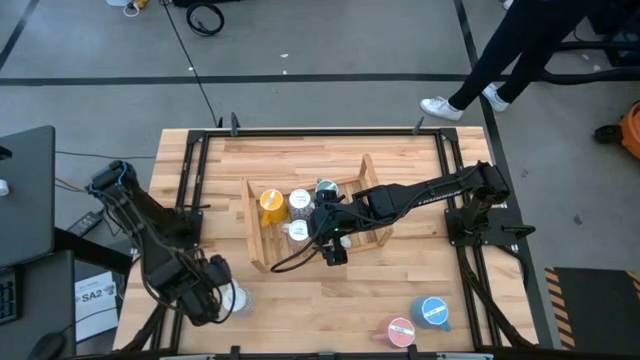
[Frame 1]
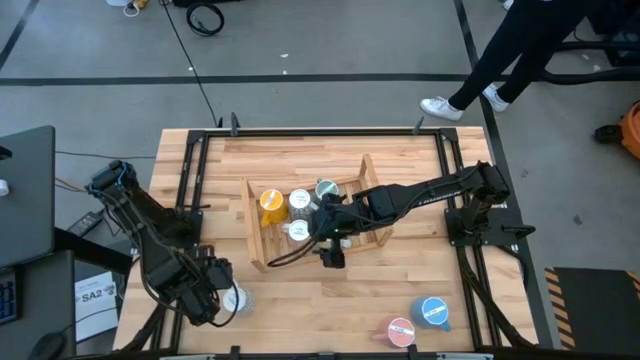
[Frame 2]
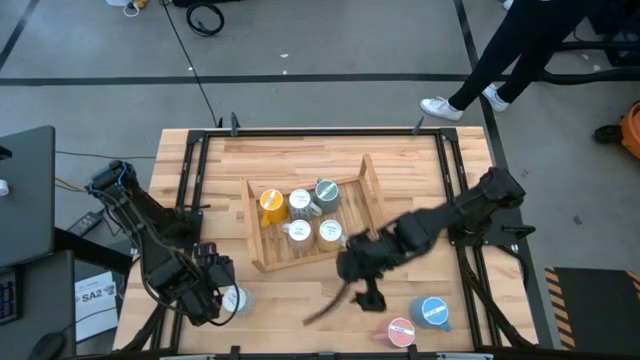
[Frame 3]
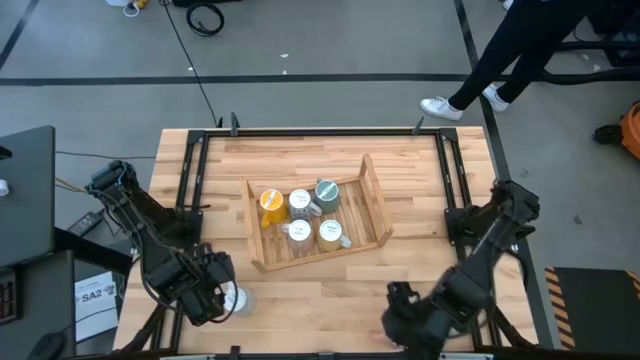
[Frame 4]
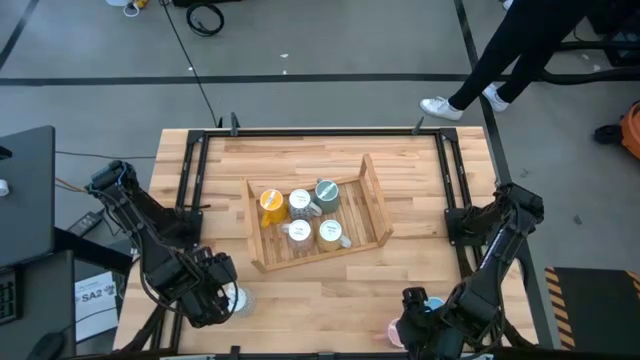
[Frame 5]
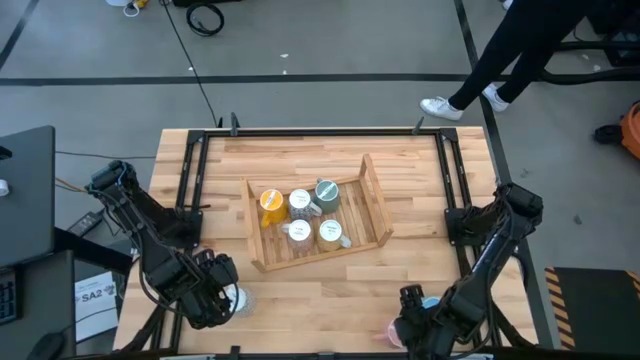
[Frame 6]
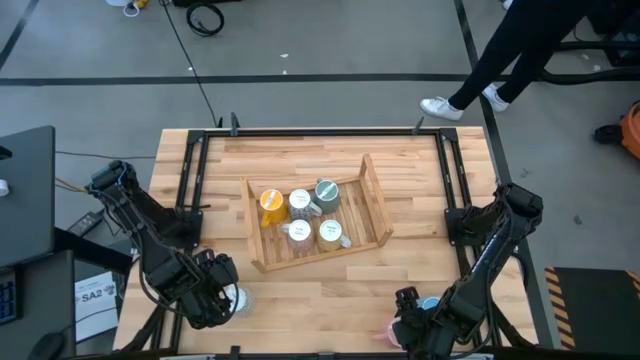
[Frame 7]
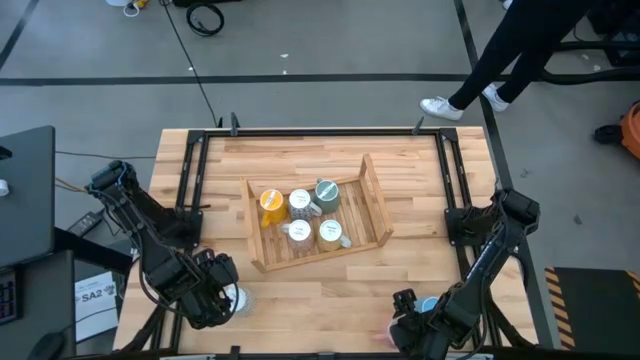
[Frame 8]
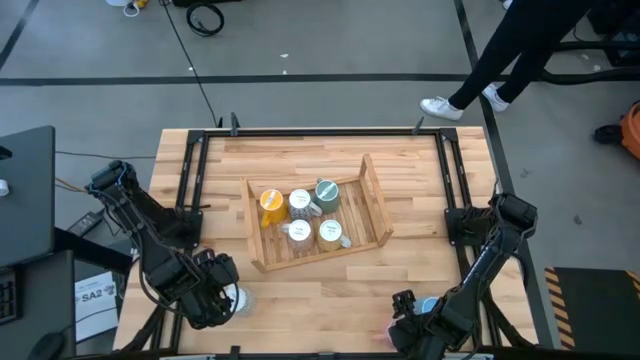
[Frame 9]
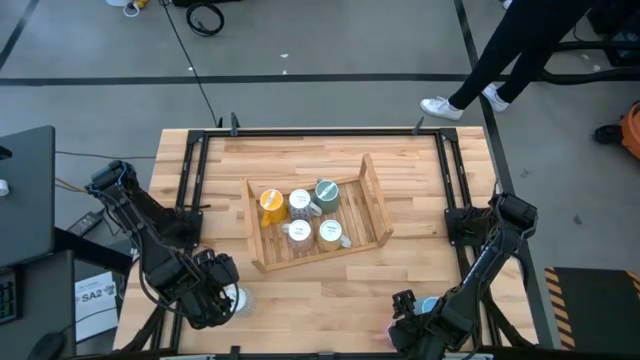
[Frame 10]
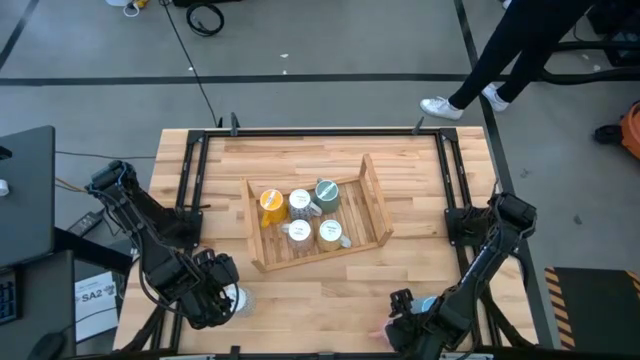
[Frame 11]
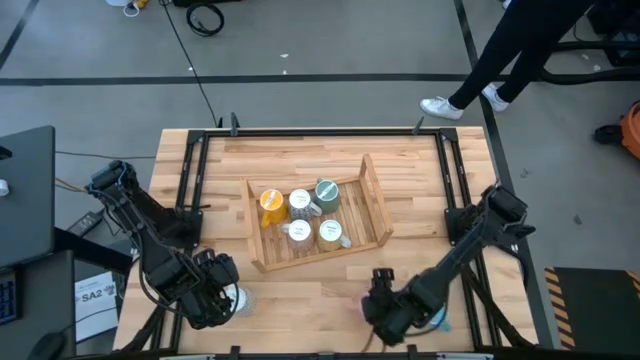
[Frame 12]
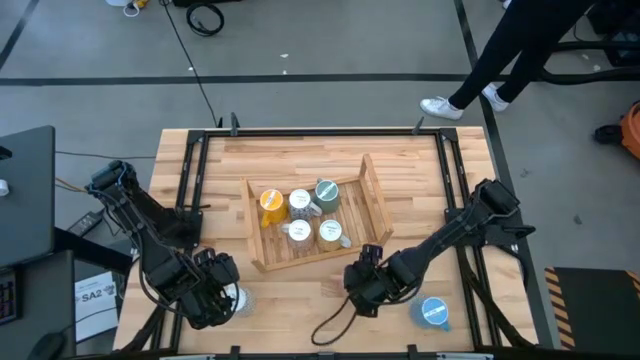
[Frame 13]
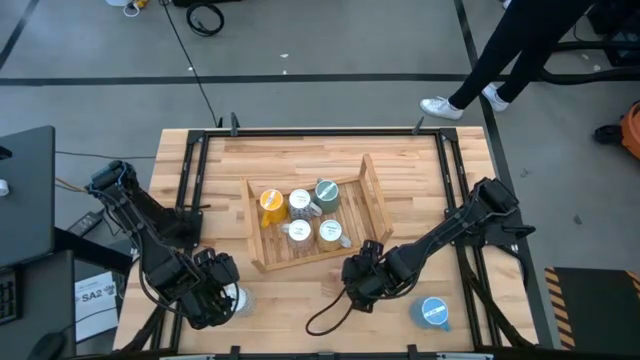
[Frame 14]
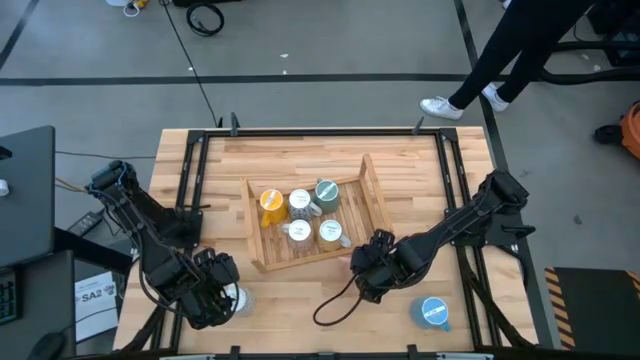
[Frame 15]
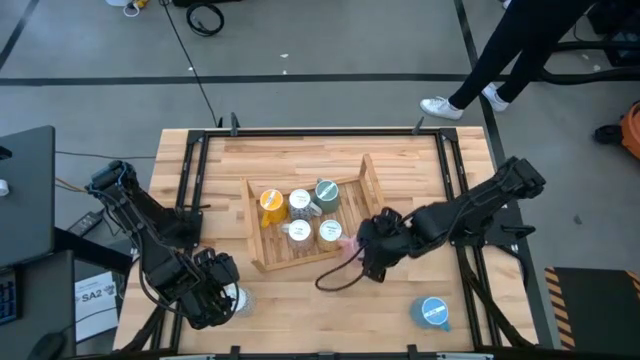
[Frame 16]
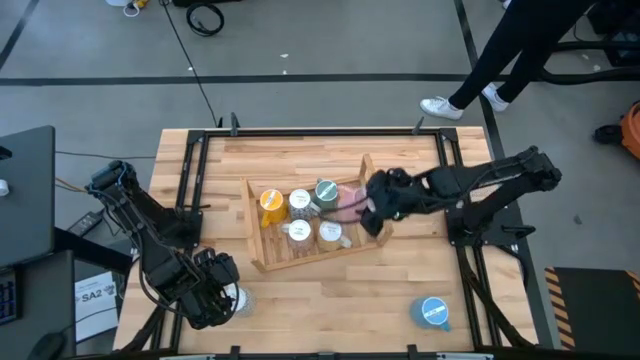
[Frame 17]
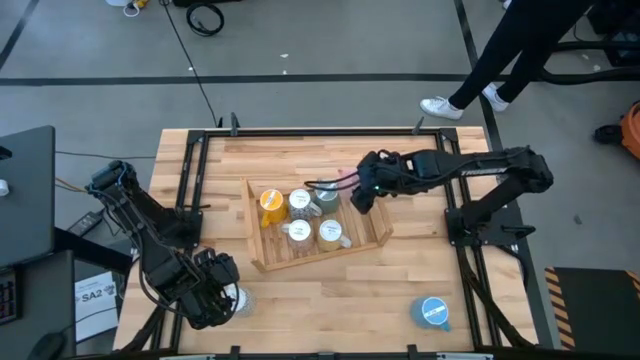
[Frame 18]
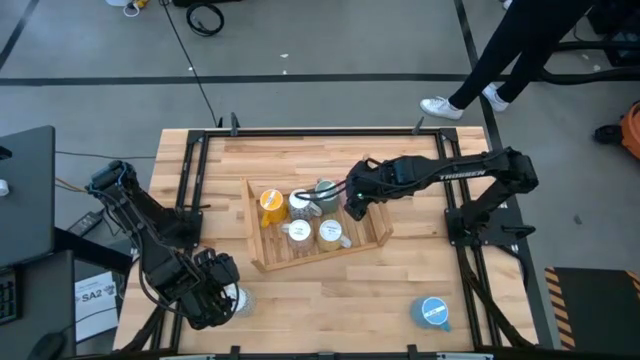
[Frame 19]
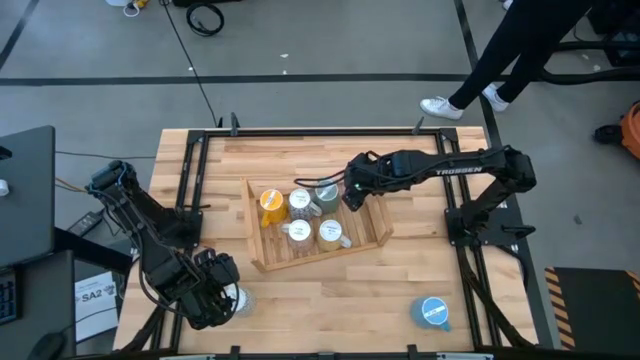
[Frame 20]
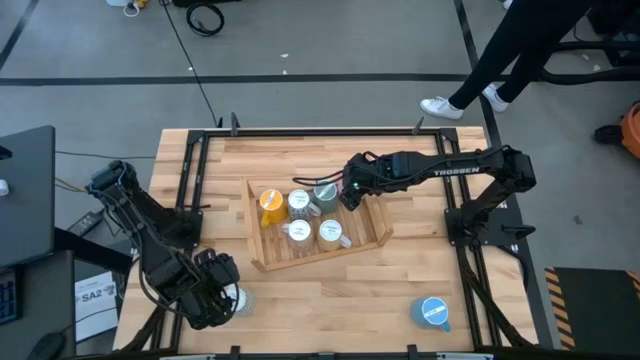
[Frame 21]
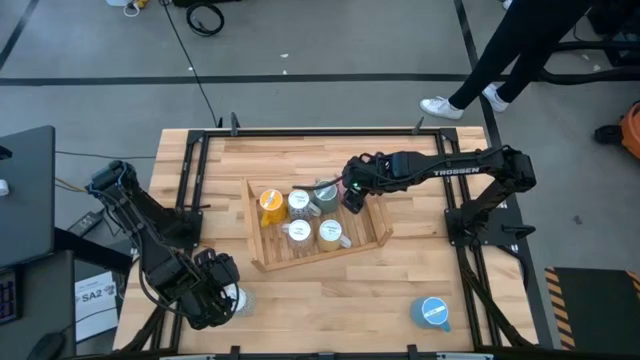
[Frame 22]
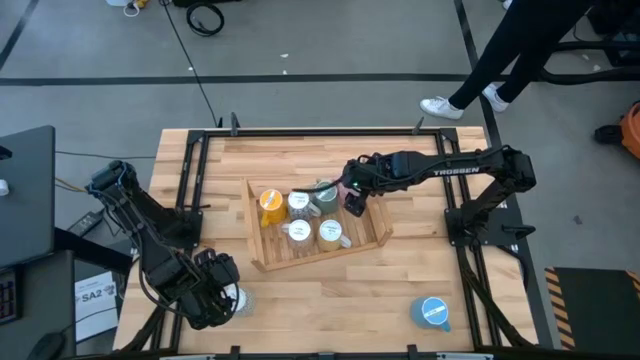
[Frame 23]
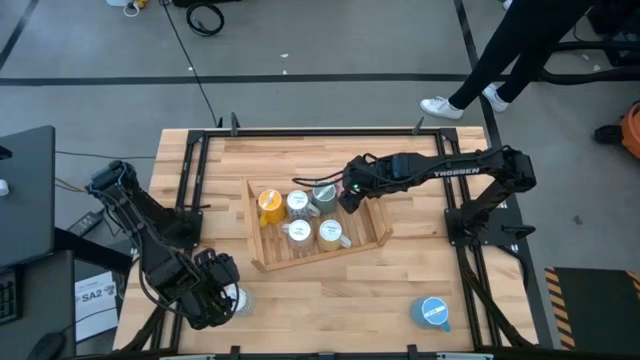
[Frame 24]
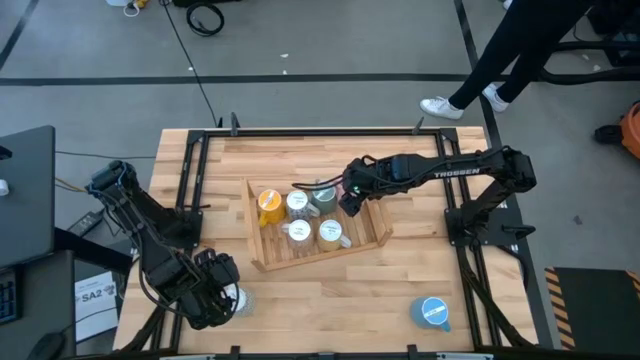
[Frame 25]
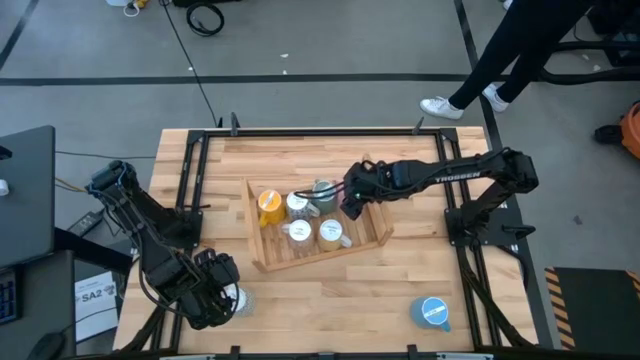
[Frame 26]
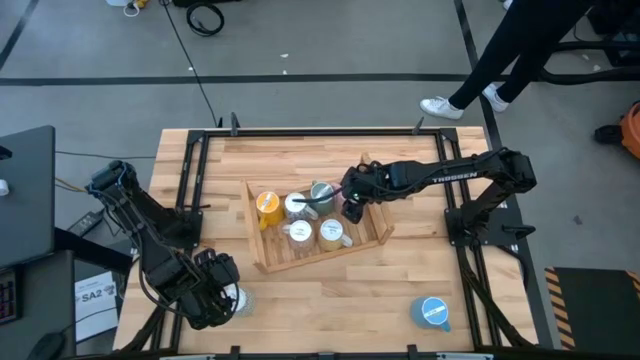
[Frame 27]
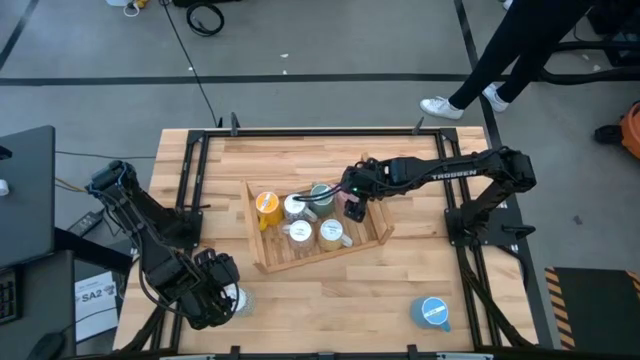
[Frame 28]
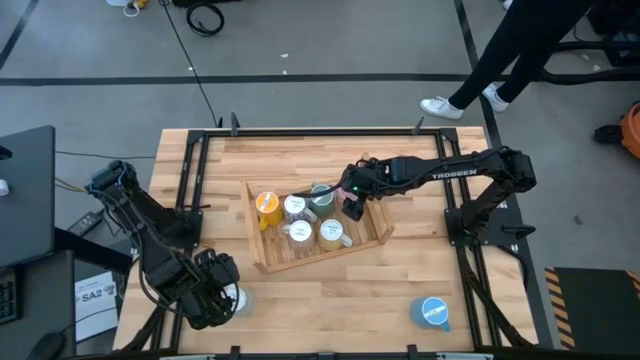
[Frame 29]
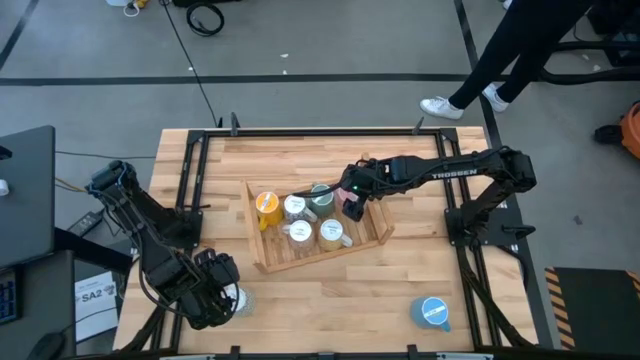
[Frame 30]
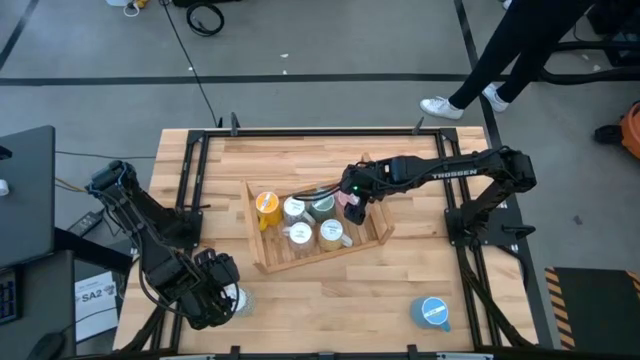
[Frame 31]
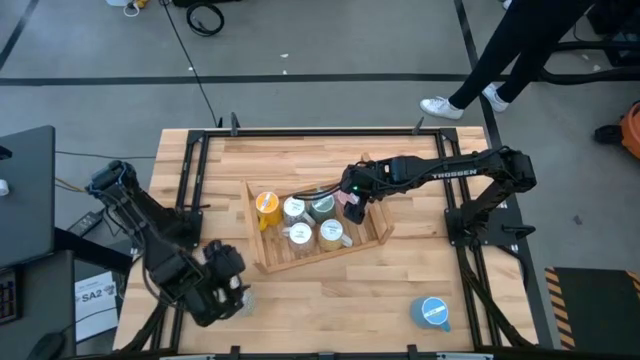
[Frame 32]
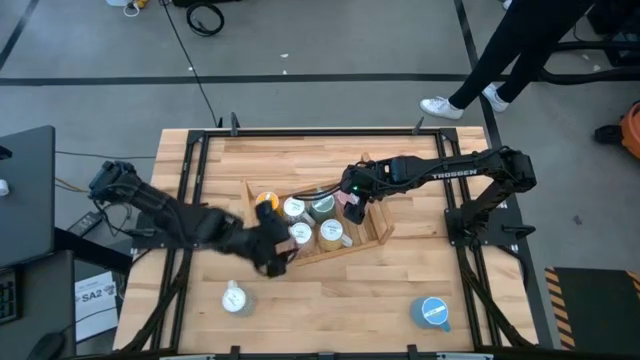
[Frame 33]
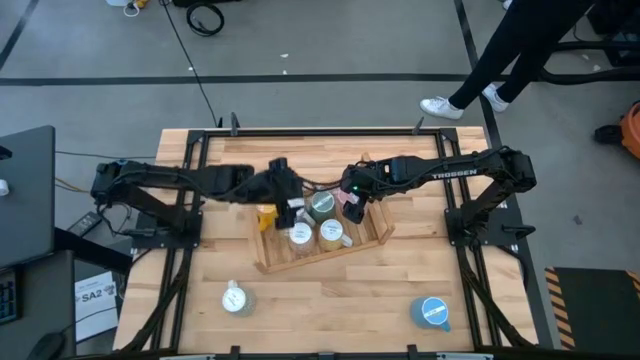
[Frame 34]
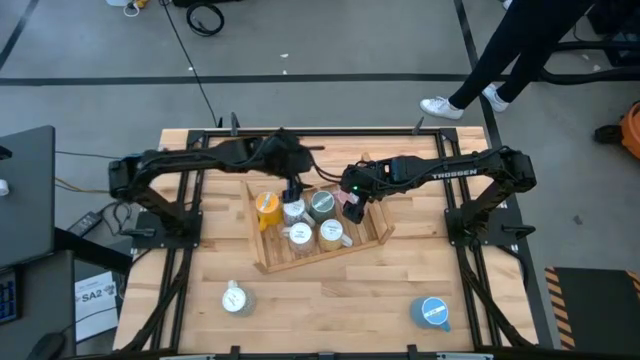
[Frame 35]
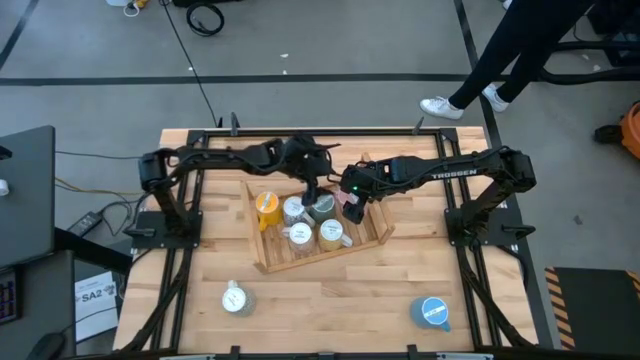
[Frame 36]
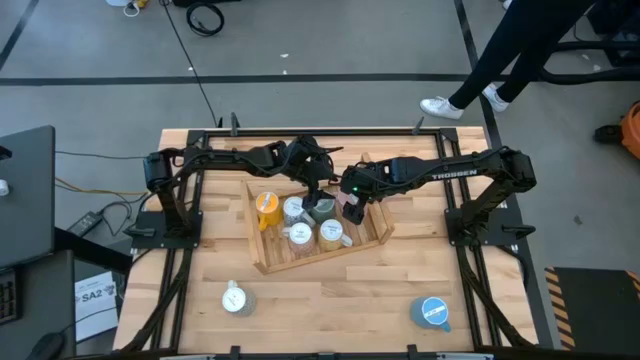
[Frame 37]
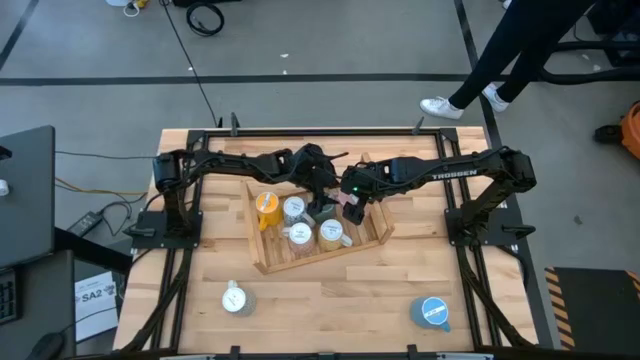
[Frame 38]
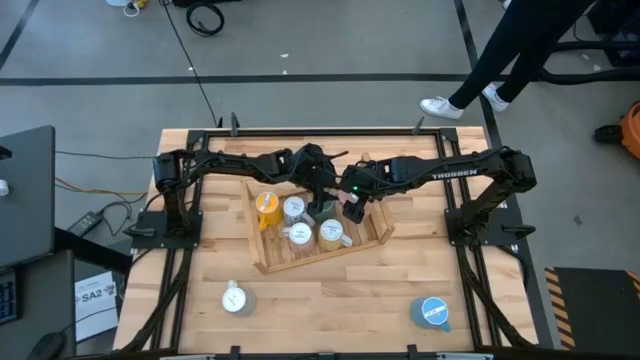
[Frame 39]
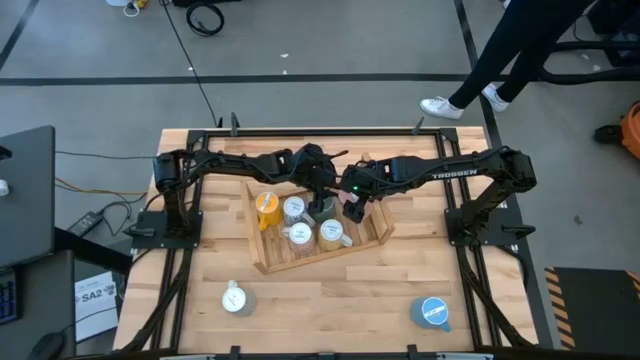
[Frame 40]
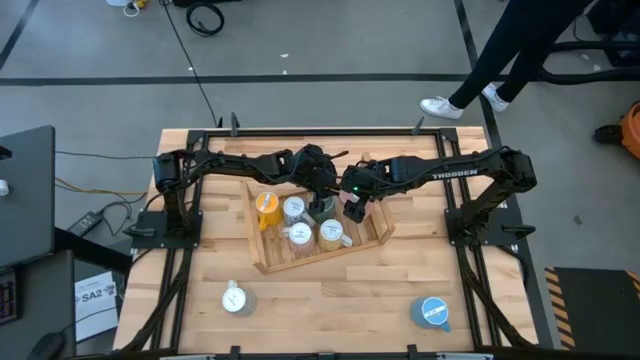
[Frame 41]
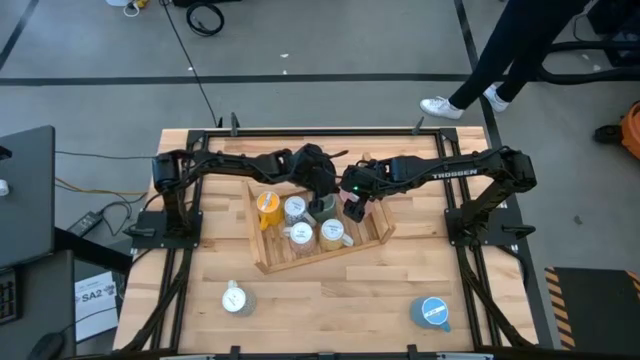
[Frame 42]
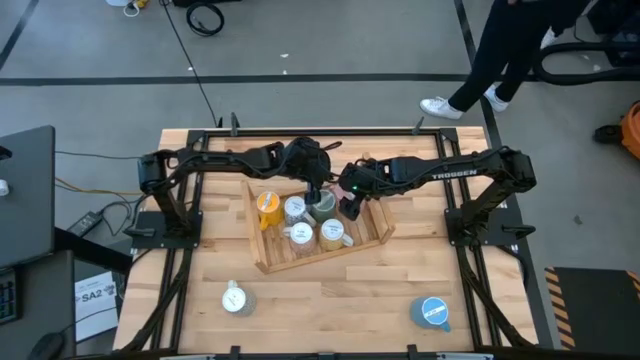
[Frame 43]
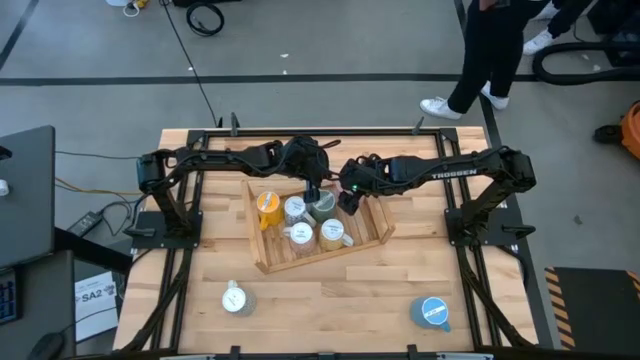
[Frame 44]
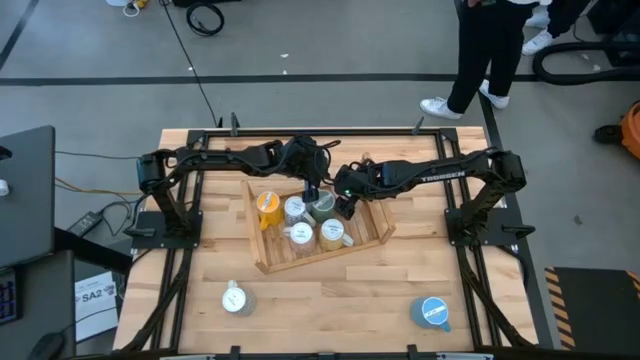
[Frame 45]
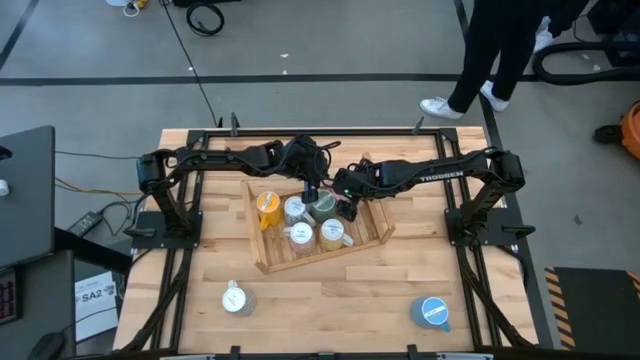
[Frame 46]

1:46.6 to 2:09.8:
Task: Place coffee mugs
Put the pink mug on the shelf
